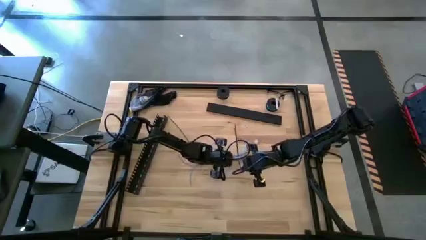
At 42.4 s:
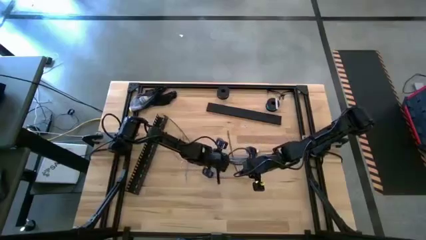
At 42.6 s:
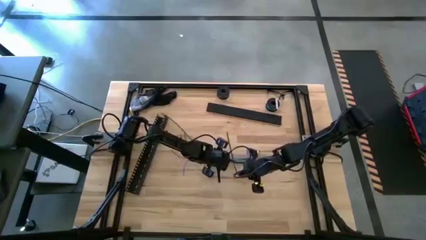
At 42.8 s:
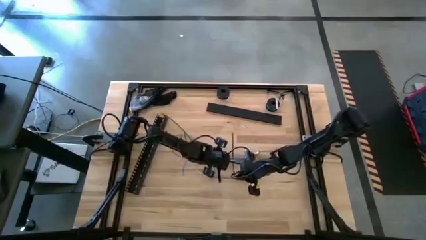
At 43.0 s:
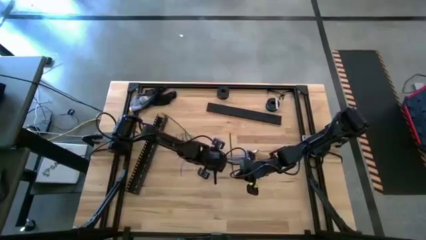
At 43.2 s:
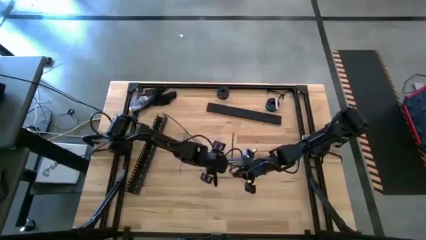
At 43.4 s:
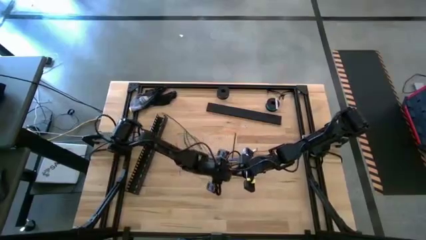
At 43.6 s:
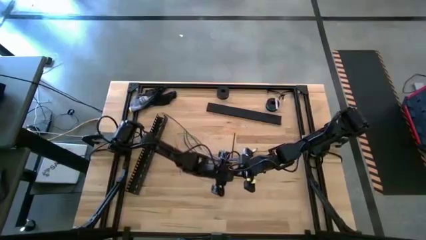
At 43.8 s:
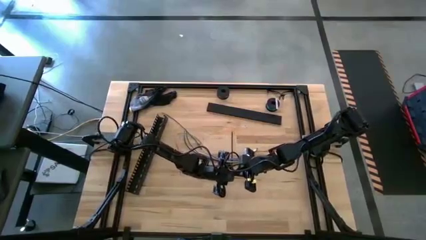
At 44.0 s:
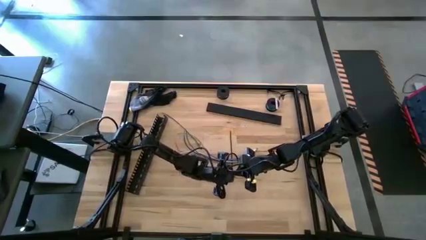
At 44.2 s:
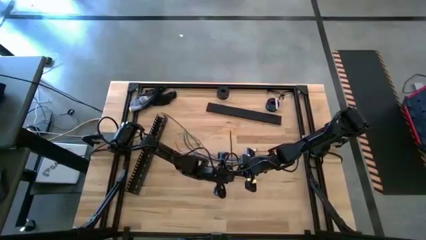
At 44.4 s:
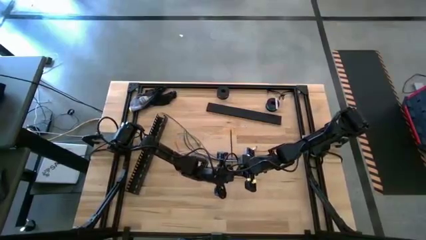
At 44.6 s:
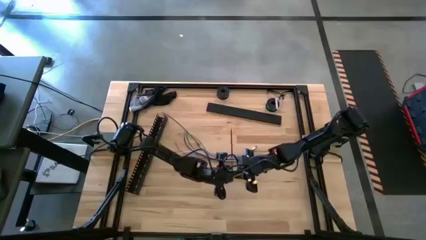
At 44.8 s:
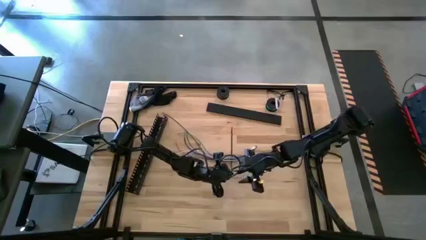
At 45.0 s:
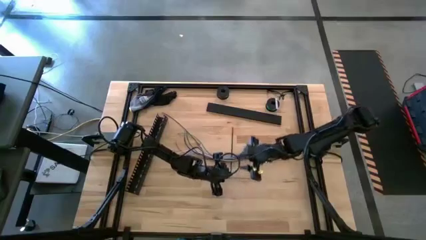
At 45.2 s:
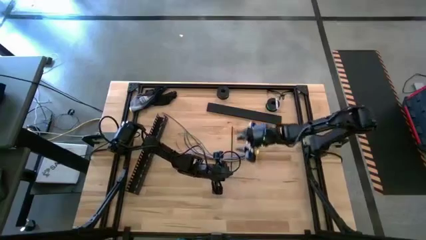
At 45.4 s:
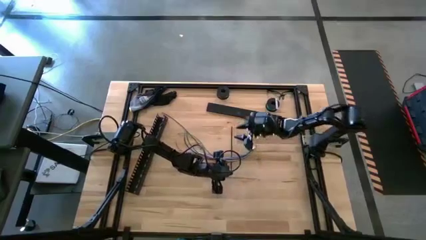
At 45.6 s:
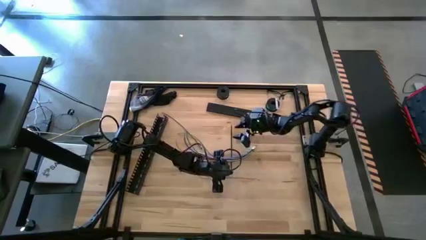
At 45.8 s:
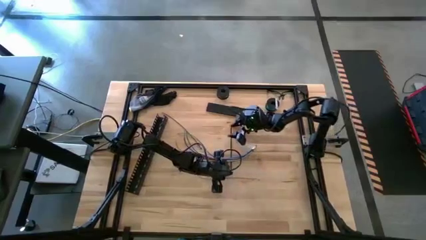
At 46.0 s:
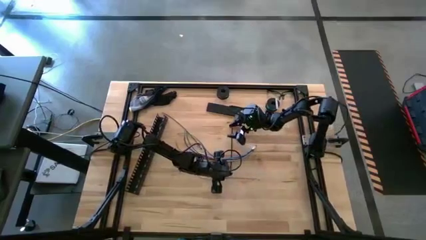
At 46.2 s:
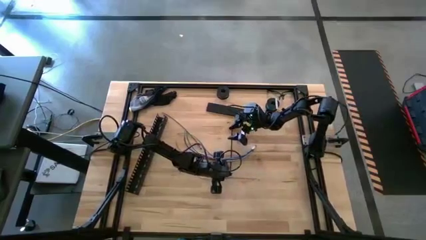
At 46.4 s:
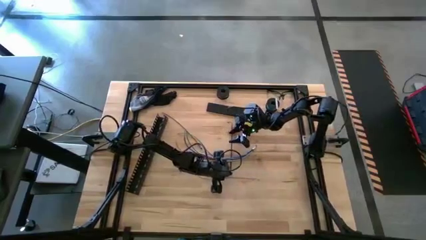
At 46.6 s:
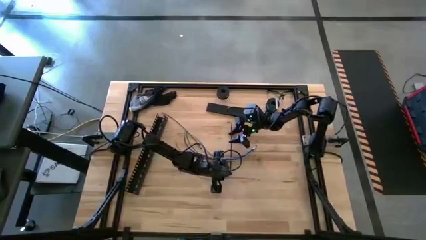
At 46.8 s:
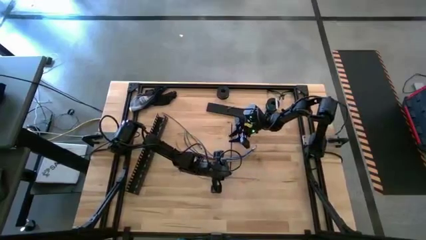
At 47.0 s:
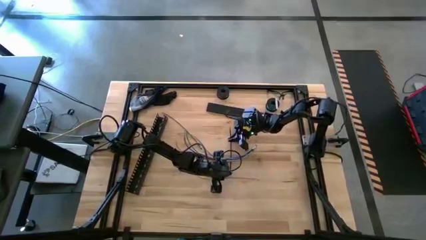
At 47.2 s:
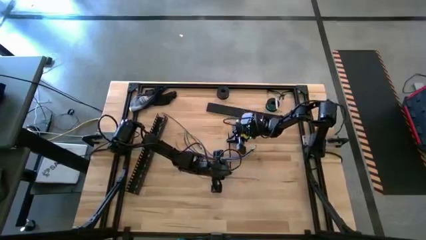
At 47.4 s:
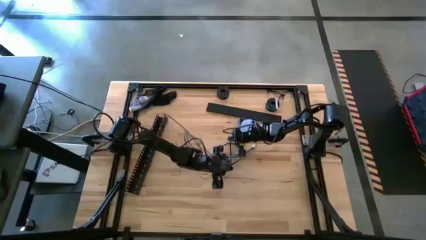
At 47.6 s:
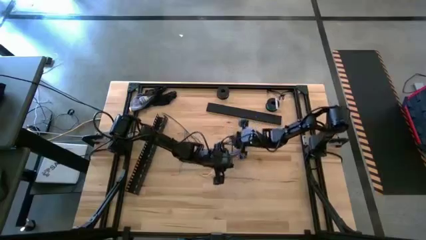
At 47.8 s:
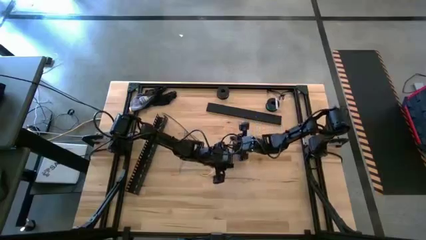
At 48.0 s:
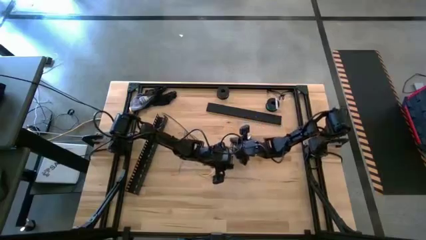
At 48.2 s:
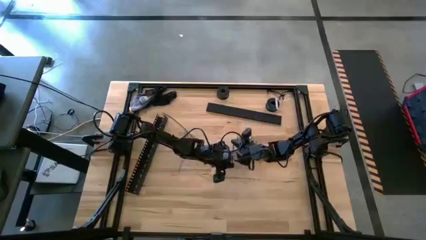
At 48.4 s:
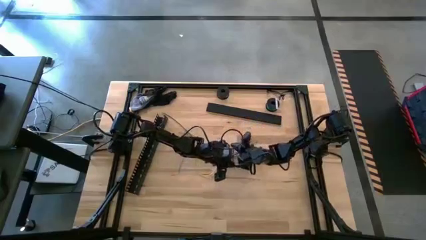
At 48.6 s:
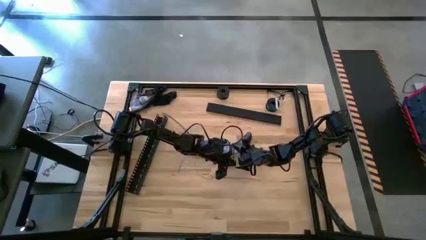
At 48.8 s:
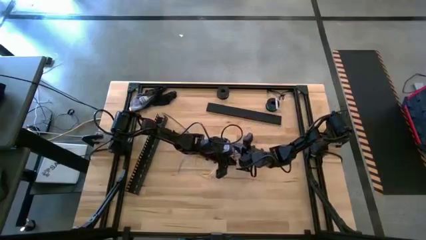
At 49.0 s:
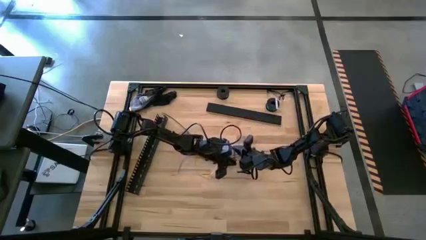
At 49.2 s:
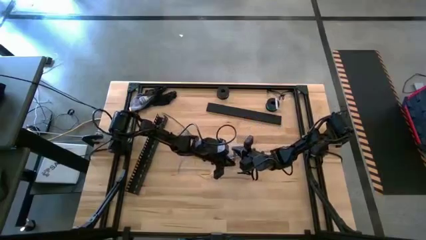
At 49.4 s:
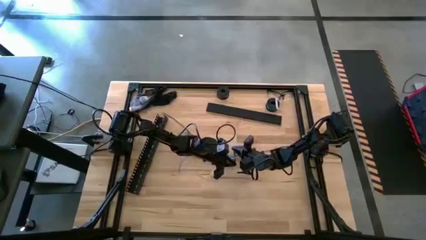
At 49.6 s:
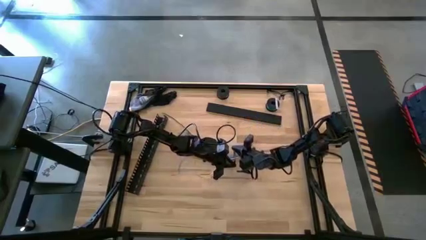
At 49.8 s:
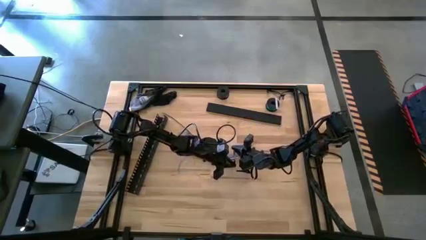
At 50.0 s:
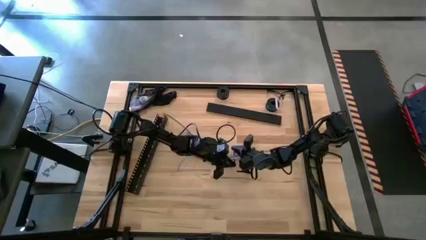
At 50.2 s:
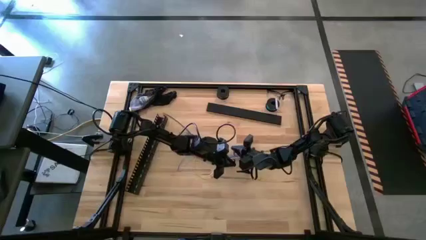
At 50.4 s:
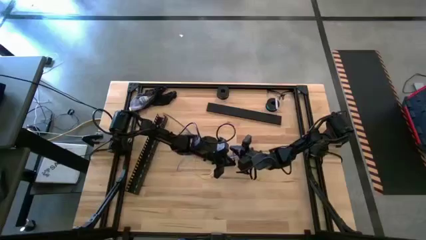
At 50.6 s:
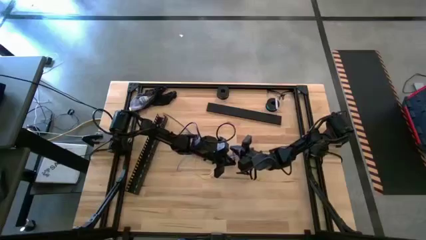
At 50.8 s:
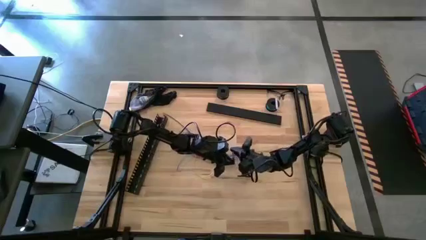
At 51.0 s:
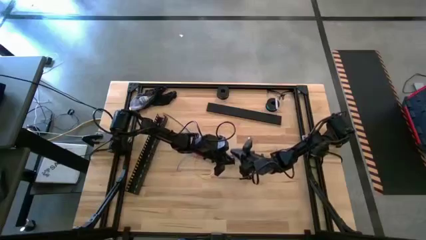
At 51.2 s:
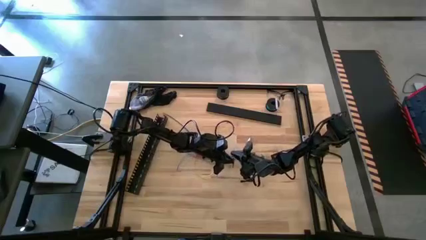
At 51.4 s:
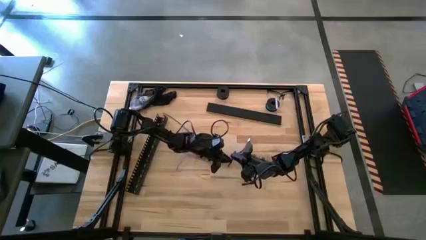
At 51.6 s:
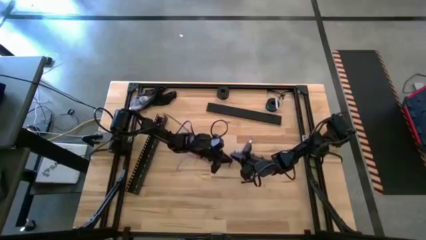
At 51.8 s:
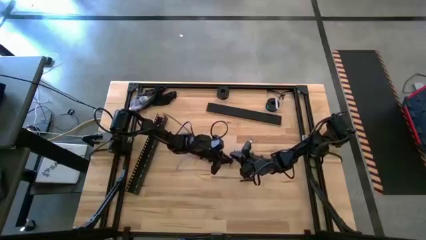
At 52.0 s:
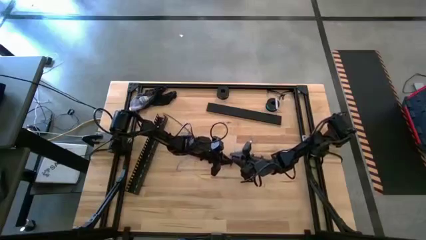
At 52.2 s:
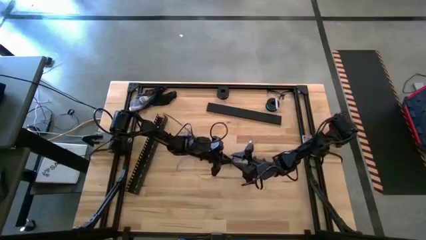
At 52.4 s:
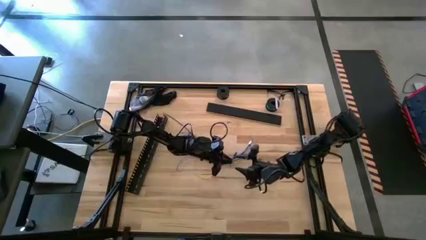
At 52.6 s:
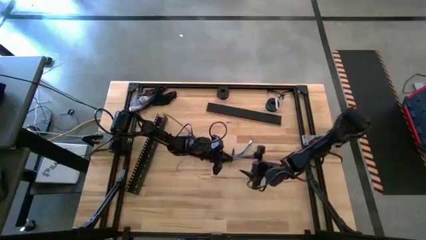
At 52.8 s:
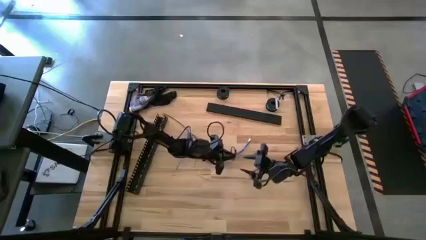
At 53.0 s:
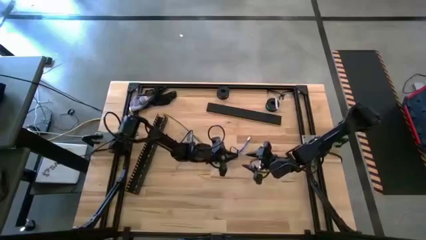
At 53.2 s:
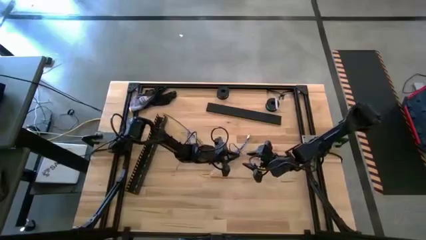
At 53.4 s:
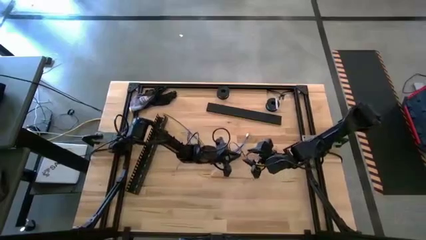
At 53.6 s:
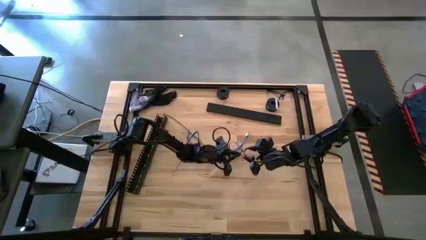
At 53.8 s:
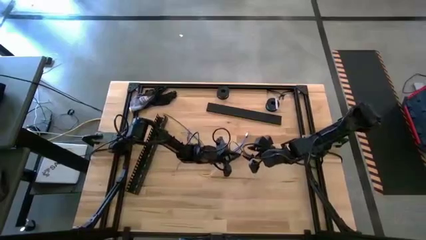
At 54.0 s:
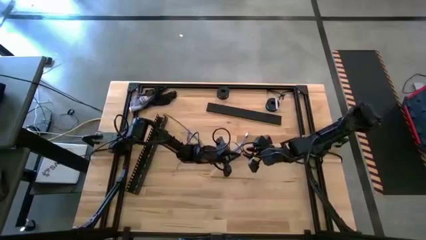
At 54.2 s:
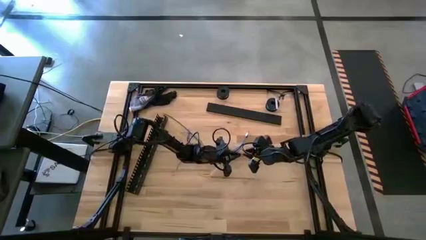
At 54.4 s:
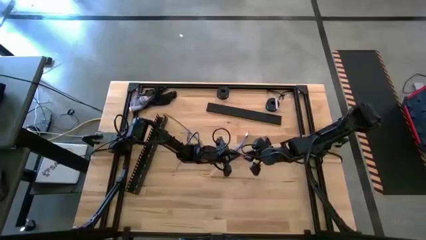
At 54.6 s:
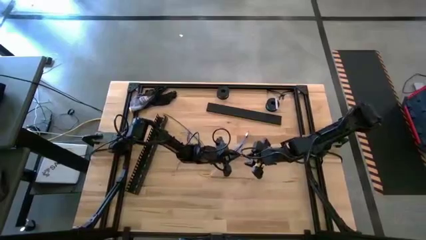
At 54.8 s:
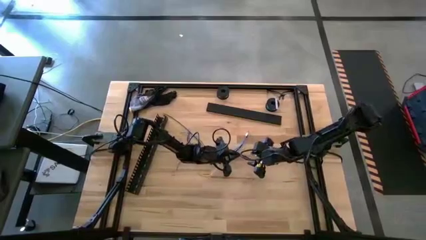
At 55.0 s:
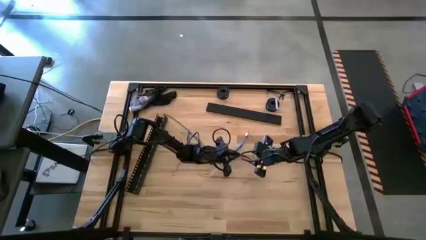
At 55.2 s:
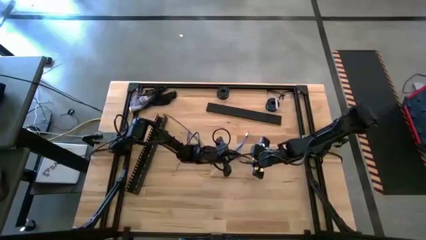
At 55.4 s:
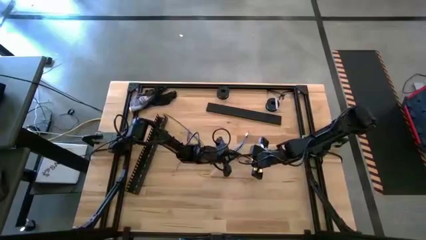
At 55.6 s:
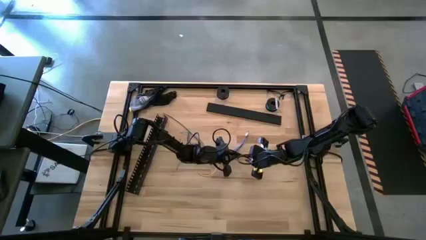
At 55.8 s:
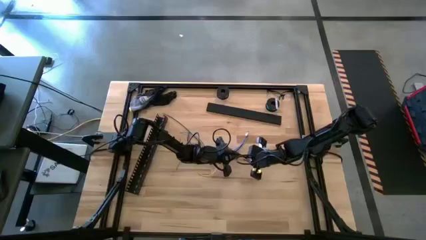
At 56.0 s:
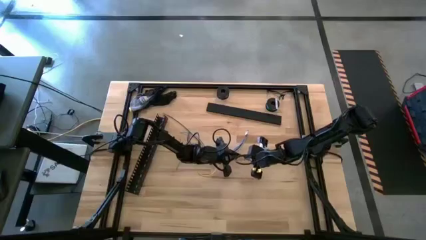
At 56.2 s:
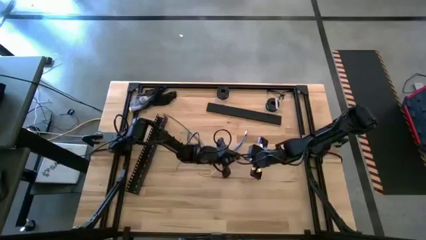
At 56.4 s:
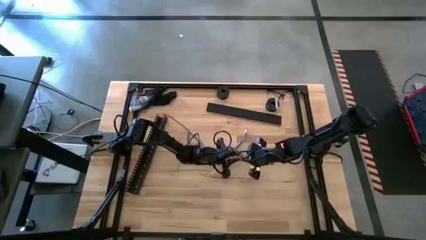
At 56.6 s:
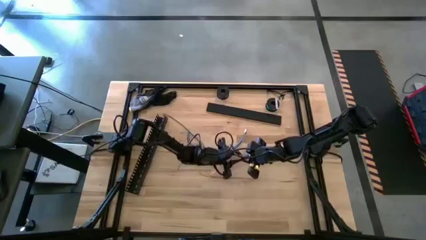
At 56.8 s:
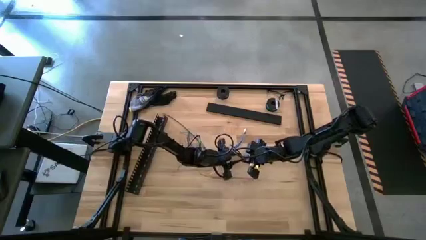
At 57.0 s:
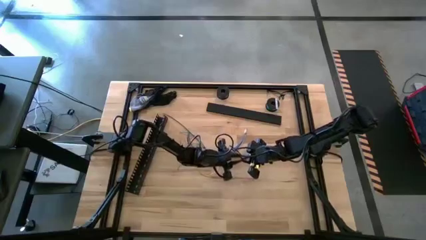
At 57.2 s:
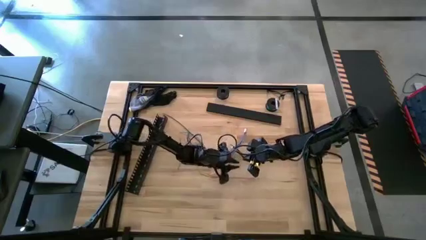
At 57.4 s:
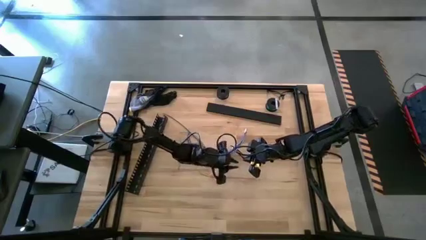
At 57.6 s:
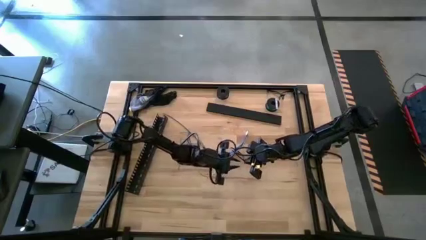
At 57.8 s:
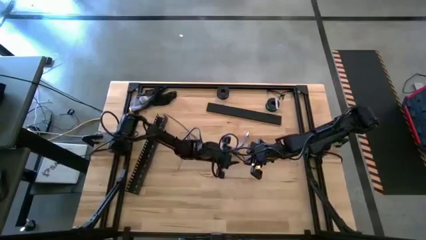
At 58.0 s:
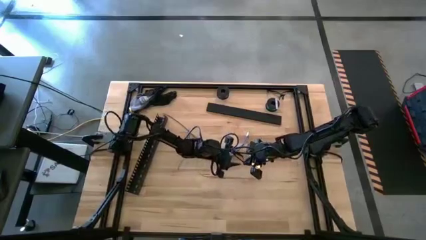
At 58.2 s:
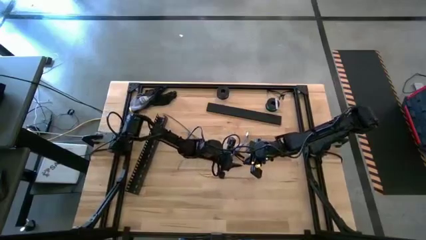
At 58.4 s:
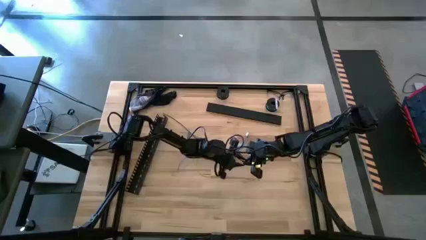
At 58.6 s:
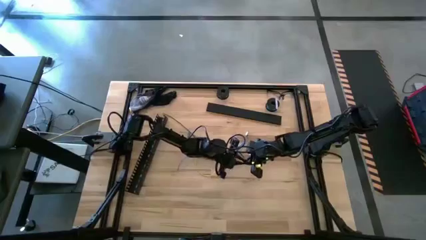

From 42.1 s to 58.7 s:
Task: Ziptie cables
Insert the right cable zip tie into the cable wires
